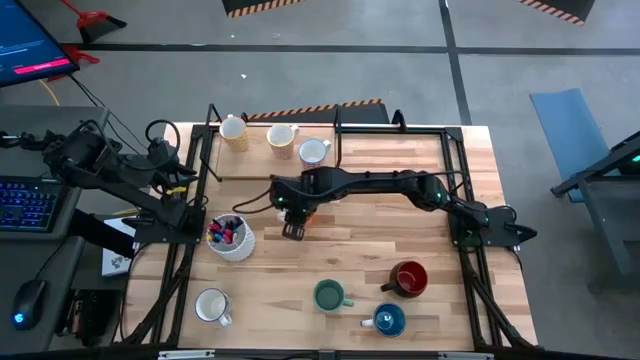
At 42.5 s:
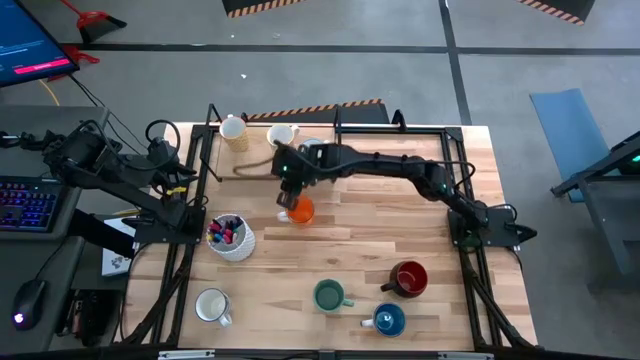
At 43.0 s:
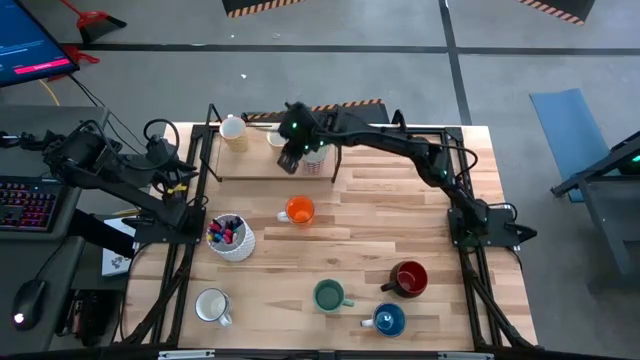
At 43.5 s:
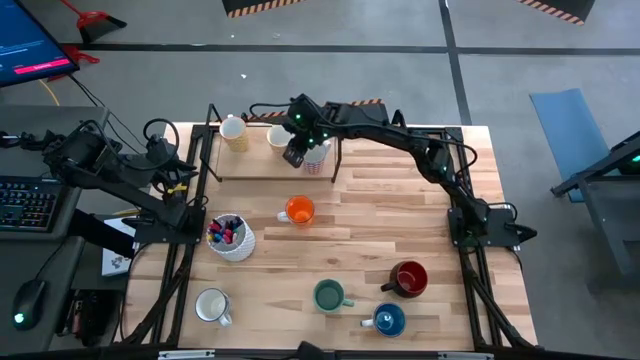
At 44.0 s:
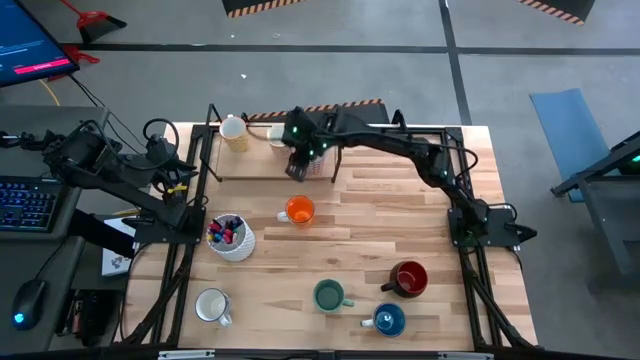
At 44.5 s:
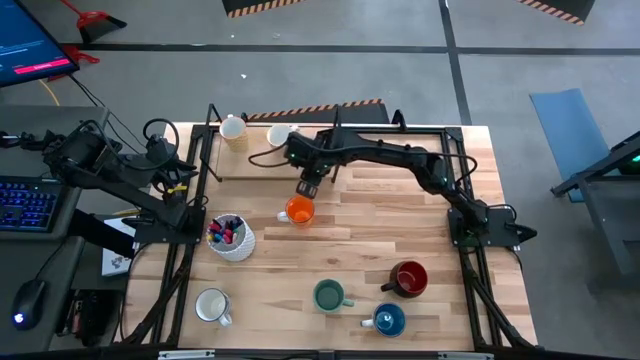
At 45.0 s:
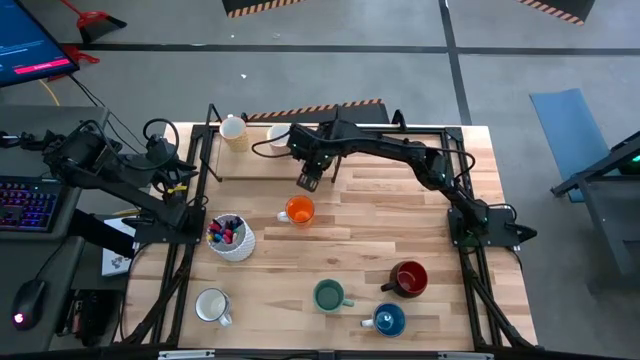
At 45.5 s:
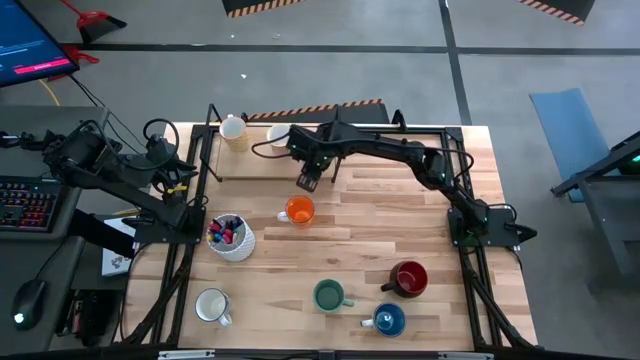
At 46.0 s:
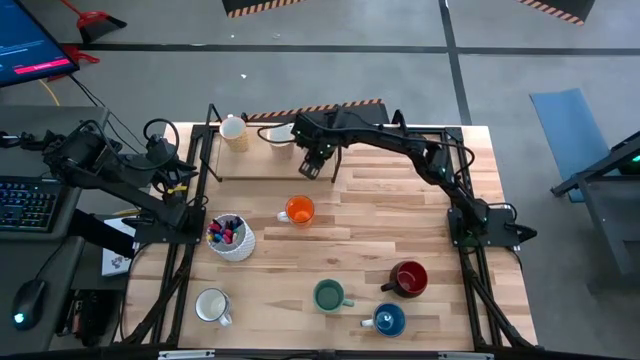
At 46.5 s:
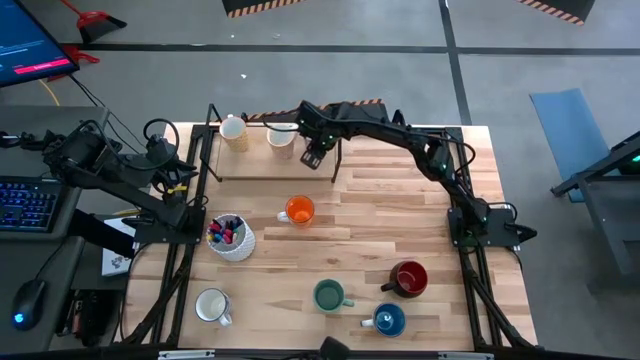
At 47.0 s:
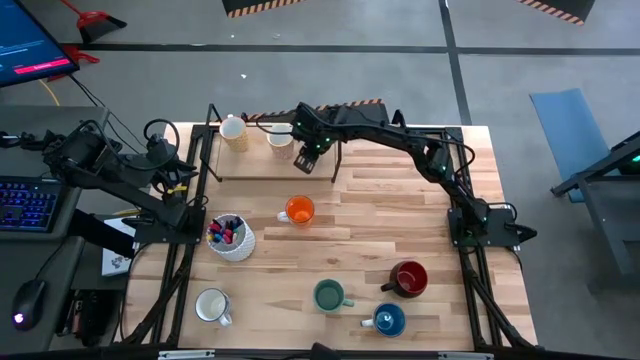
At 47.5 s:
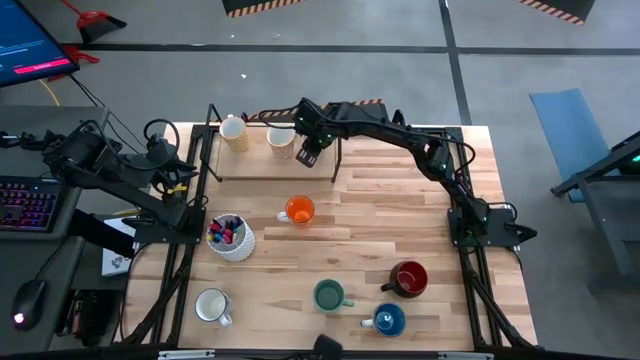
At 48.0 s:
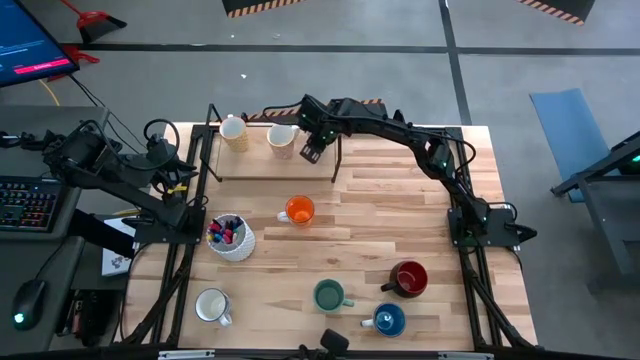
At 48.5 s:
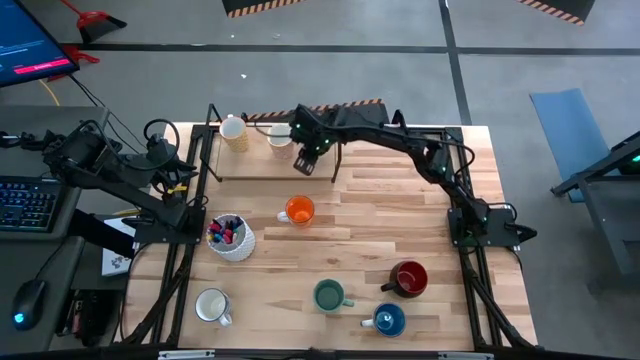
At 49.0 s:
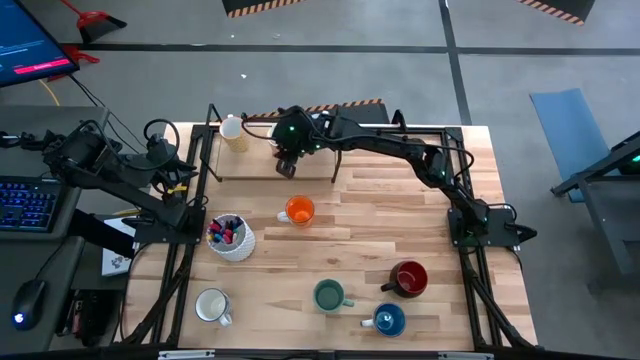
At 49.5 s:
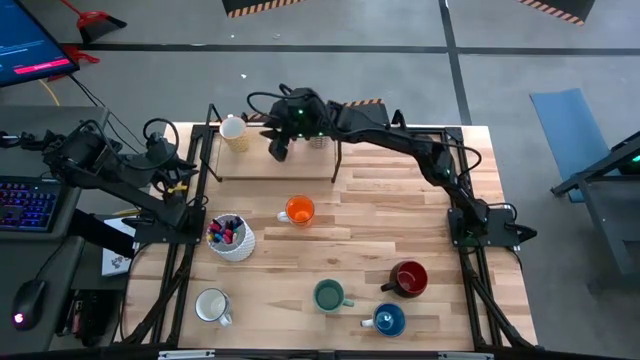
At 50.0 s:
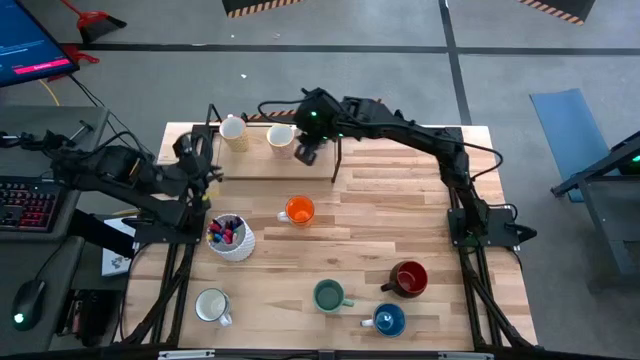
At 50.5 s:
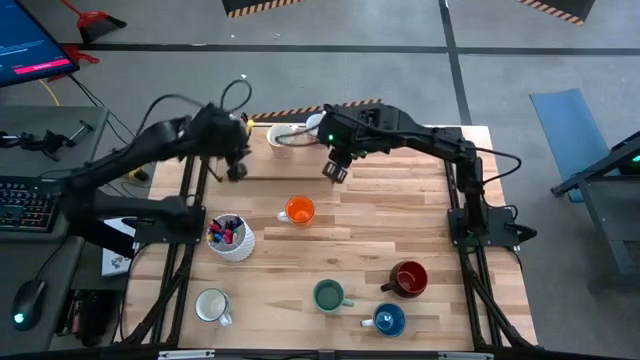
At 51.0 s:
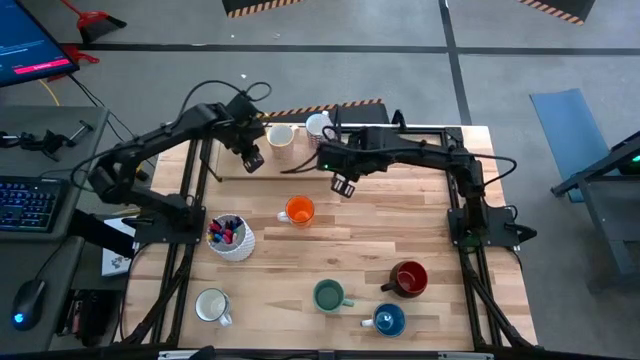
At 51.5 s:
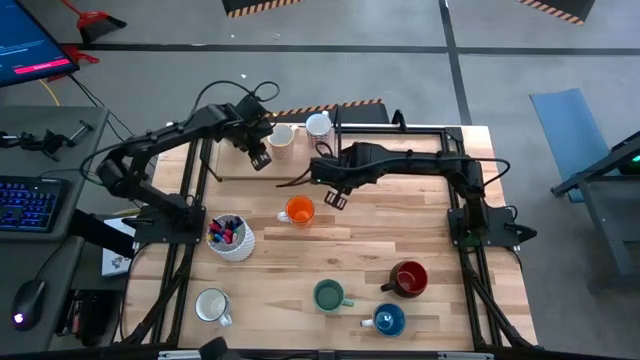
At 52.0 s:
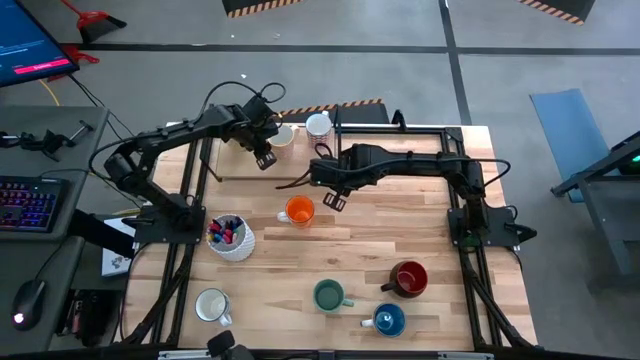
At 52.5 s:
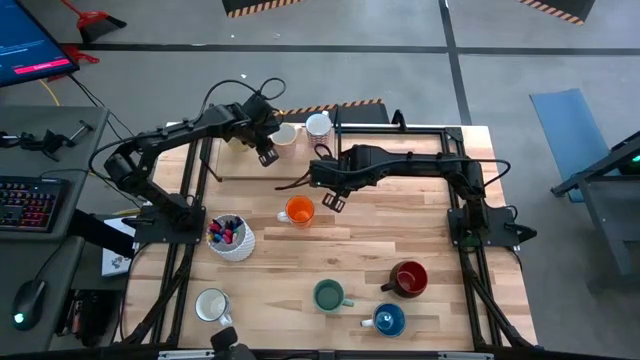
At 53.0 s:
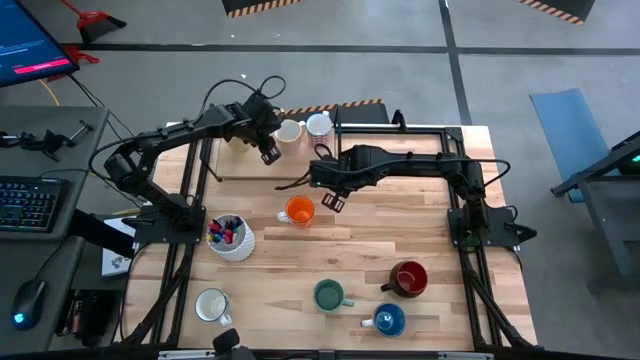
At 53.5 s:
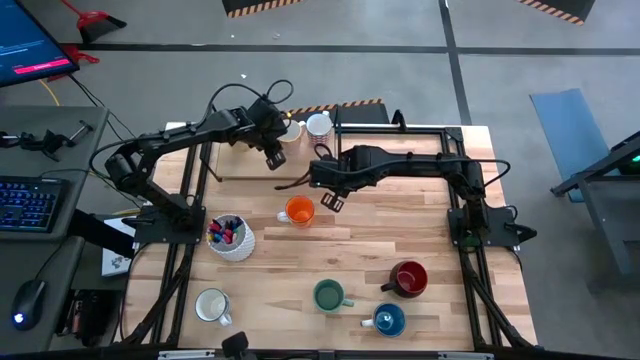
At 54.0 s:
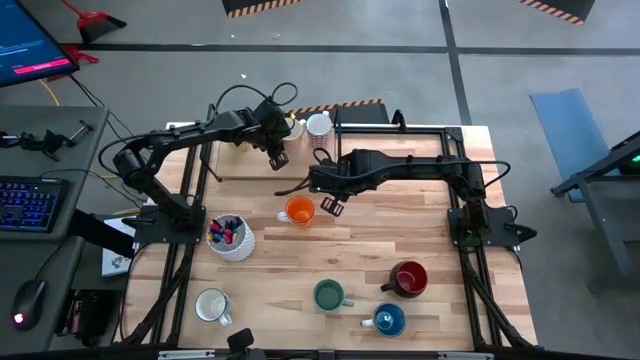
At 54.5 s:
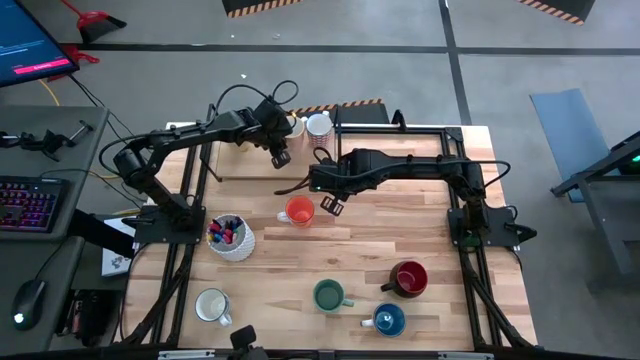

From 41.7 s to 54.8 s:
Task: Place coffee mugs
Adjust the colored mugs on the shelf

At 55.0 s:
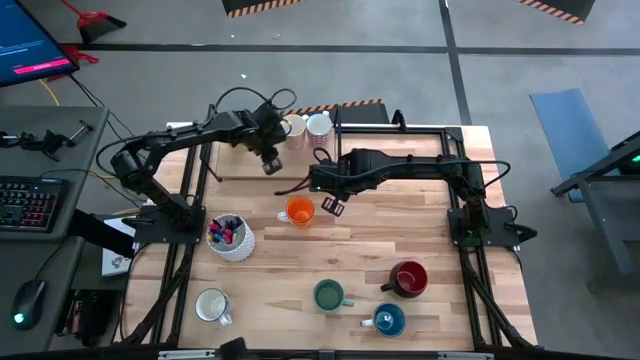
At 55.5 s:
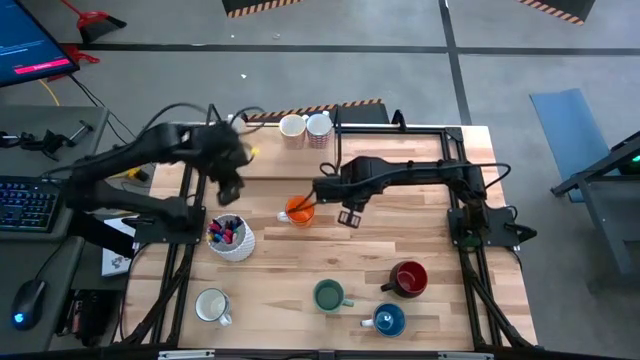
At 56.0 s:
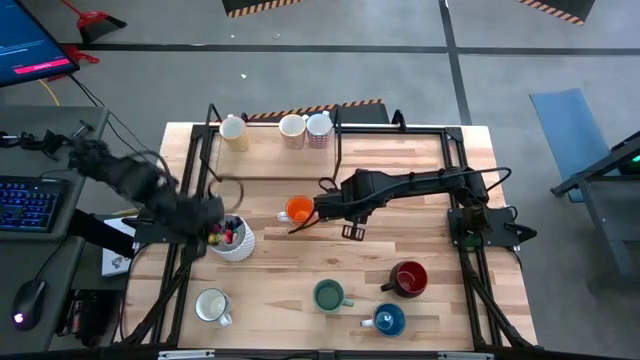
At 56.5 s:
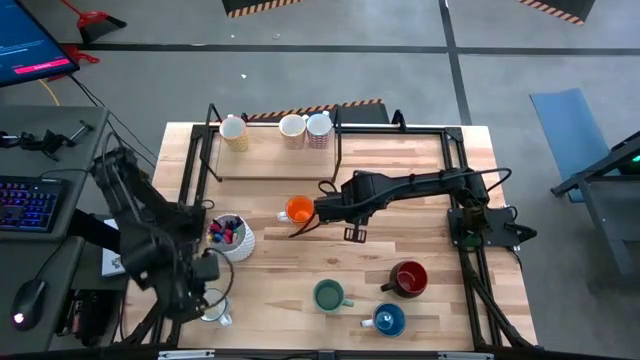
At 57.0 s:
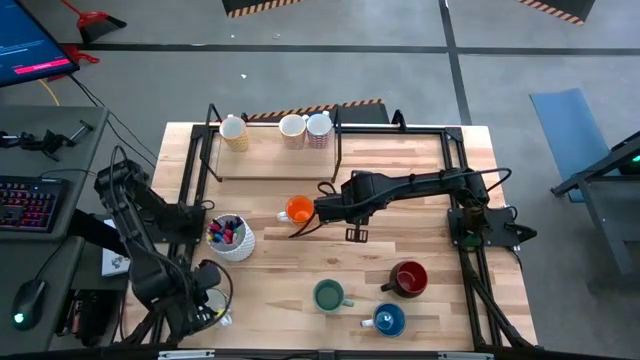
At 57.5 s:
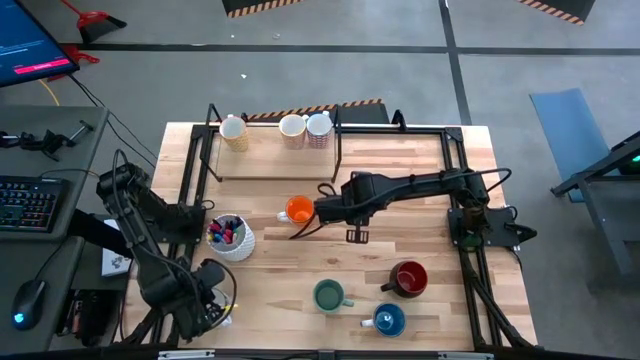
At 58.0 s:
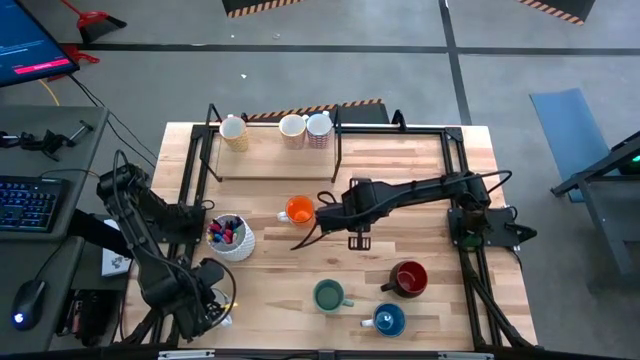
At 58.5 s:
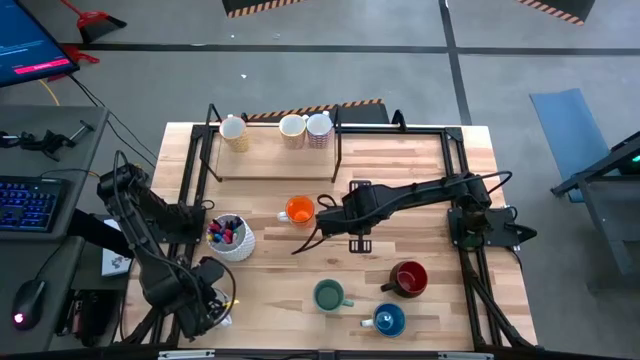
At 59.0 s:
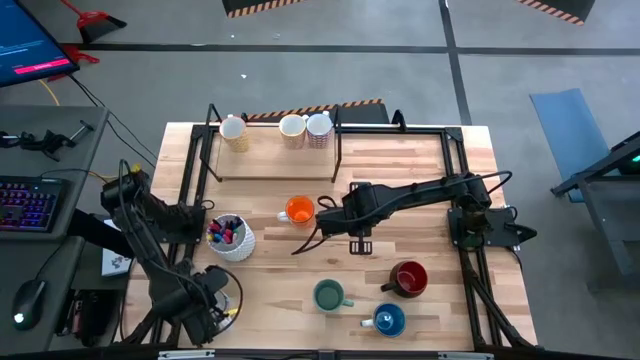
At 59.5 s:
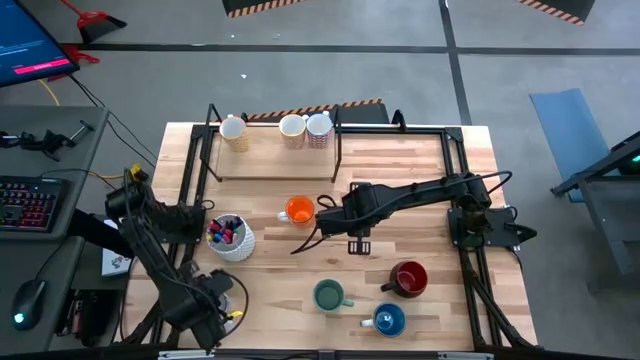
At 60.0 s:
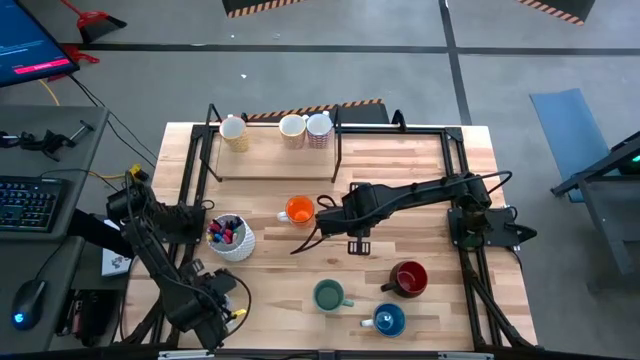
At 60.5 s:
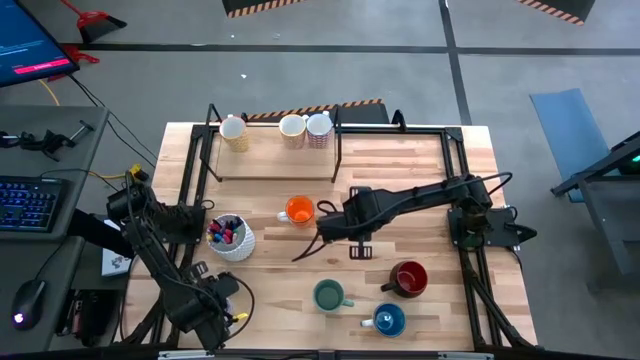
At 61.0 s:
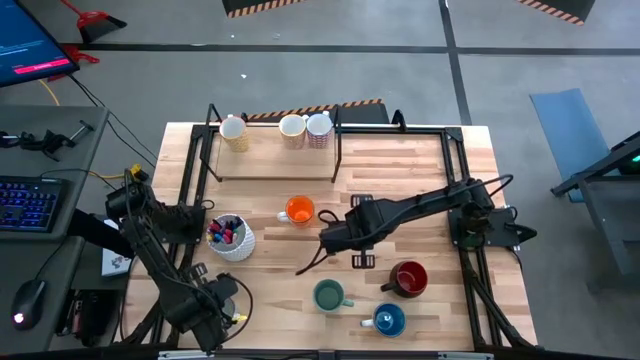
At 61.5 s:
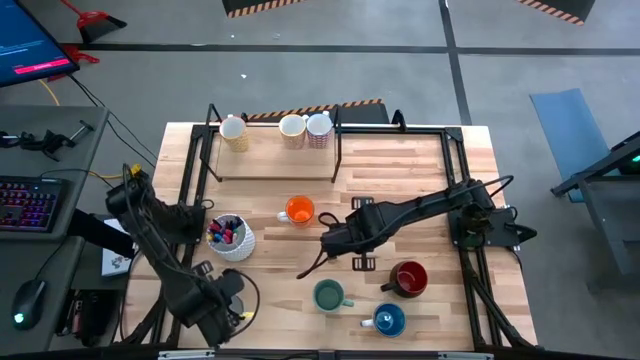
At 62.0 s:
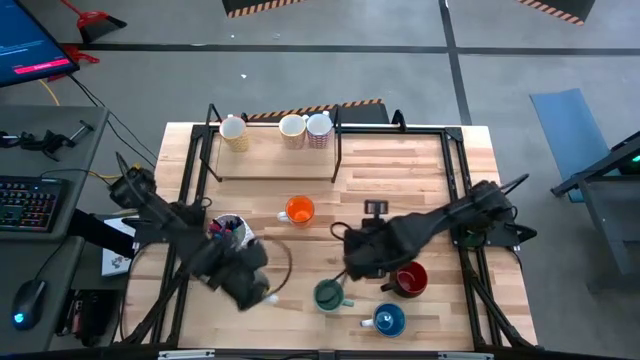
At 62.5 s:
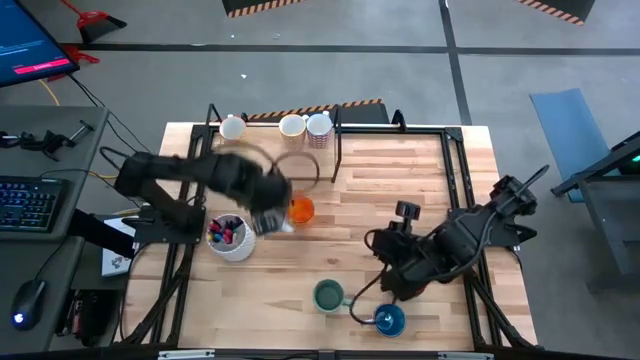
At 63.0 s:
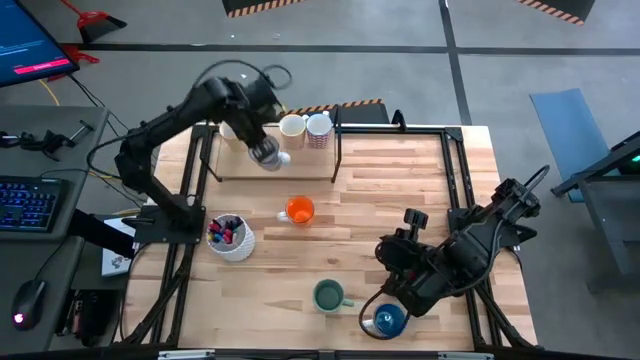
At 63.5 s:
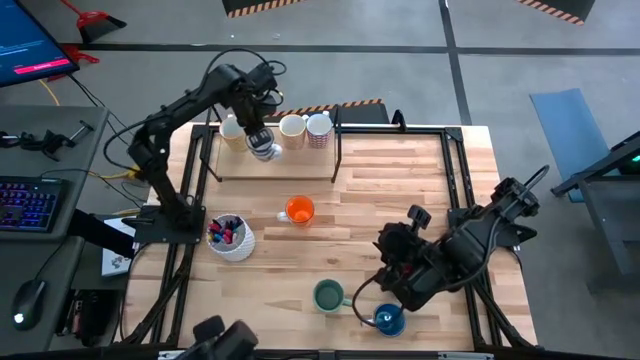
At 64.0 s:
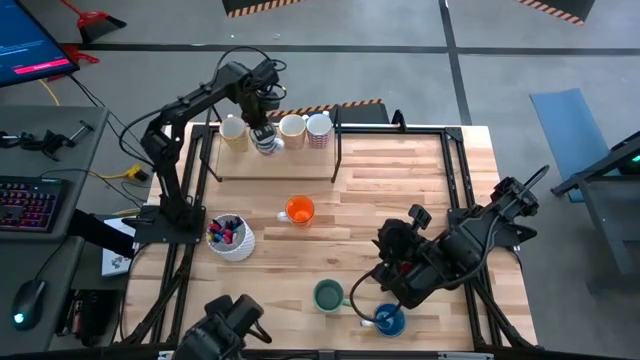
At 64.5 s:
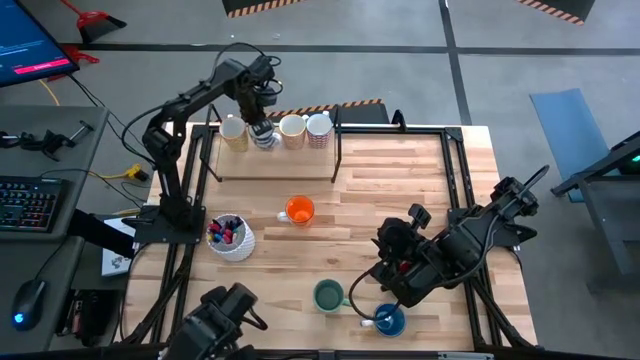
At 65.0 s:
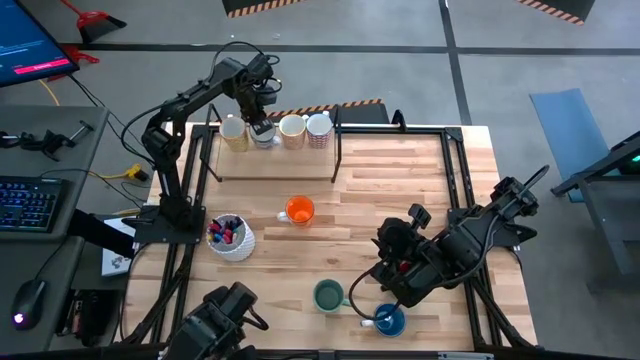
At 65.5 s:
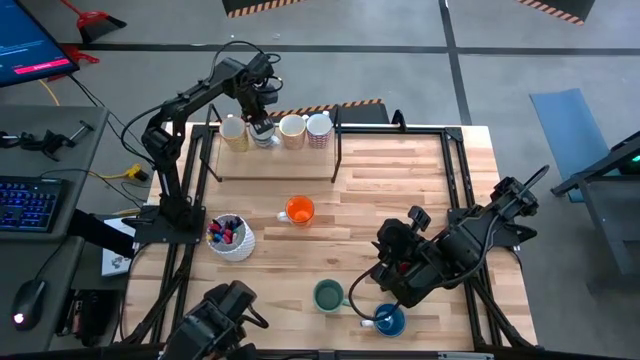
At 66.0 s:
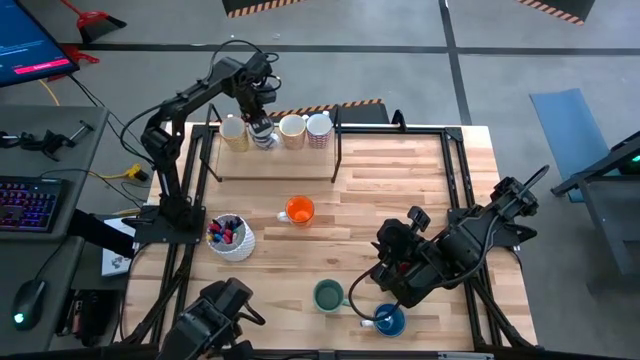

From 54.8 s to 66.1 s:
Put the blue patterned mug on the shelf
